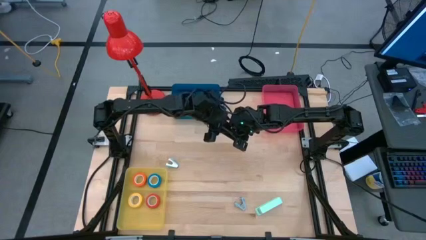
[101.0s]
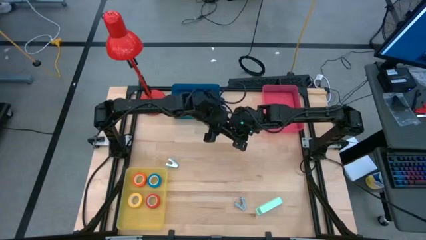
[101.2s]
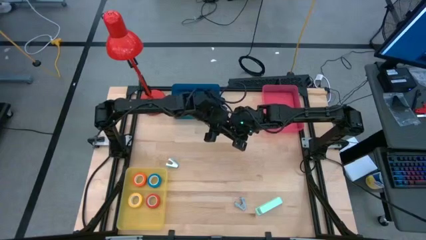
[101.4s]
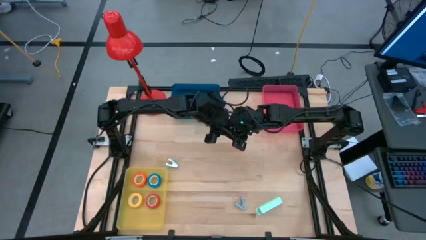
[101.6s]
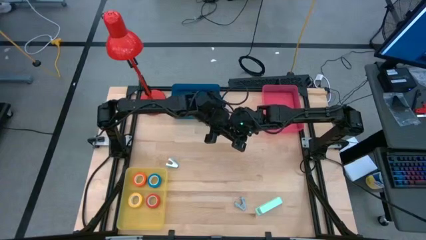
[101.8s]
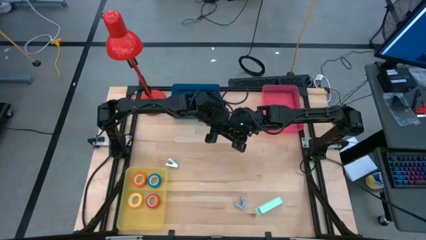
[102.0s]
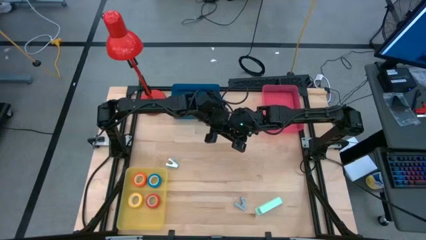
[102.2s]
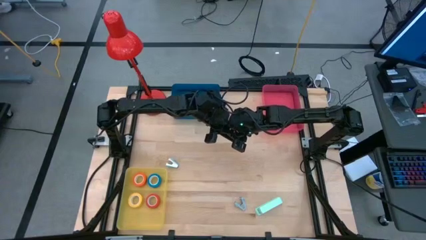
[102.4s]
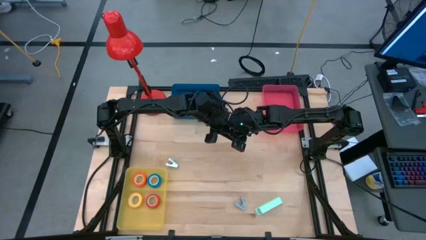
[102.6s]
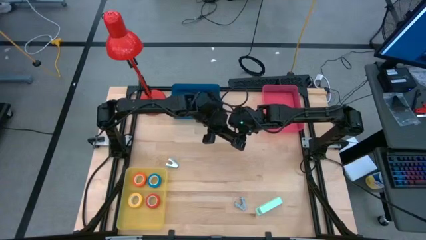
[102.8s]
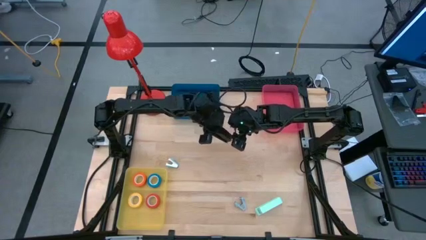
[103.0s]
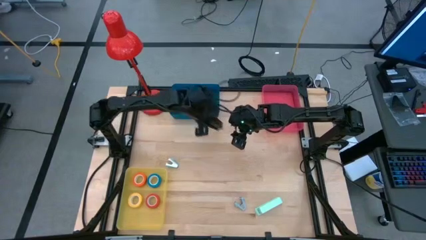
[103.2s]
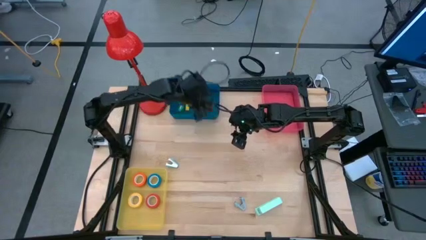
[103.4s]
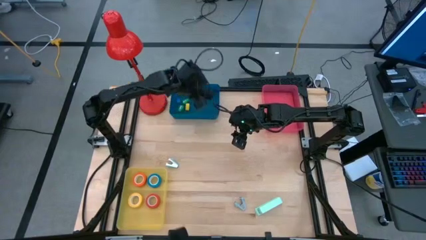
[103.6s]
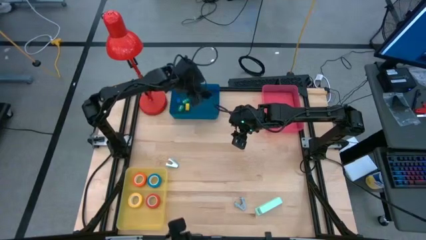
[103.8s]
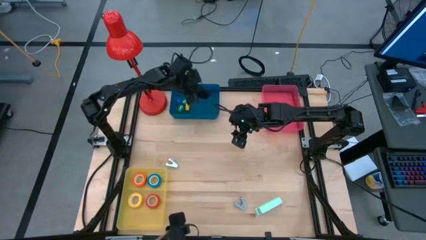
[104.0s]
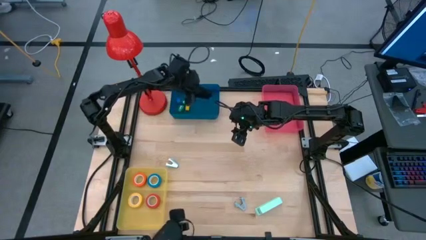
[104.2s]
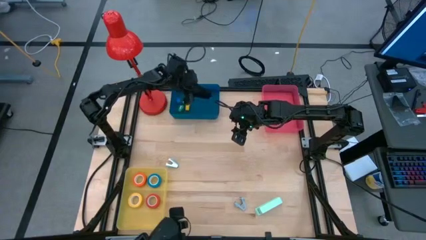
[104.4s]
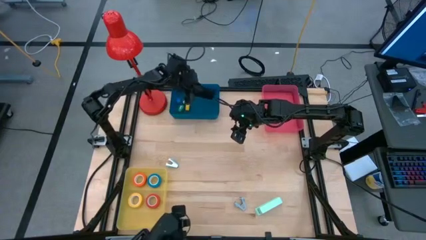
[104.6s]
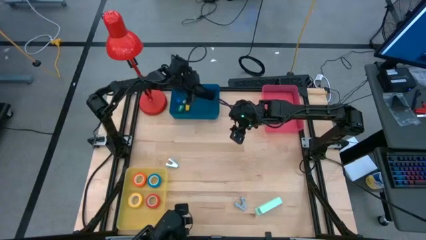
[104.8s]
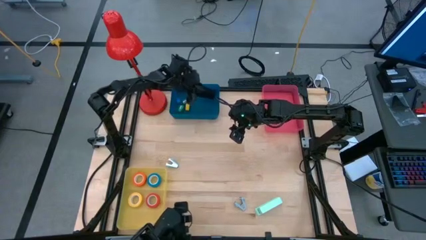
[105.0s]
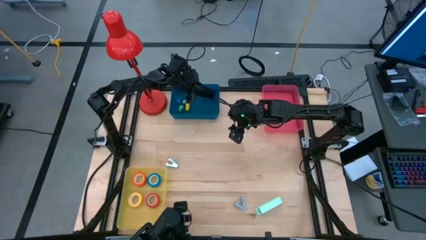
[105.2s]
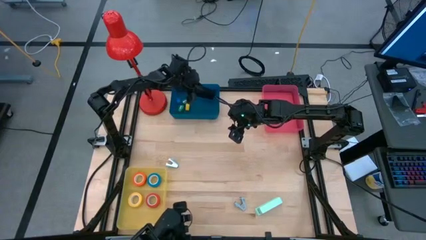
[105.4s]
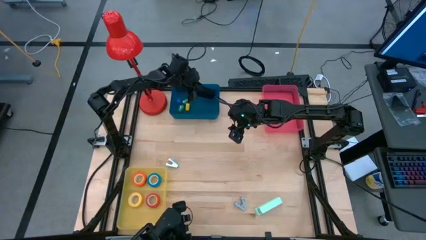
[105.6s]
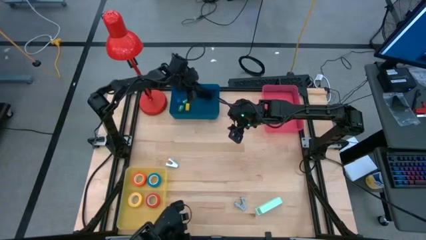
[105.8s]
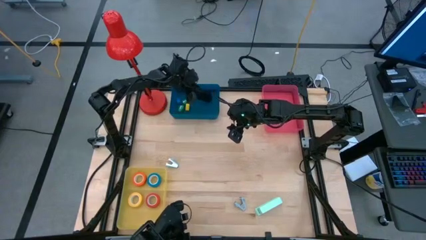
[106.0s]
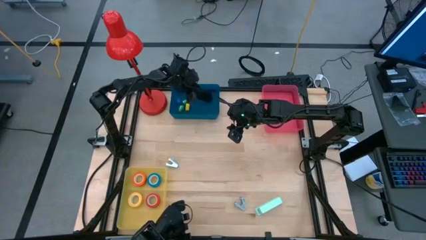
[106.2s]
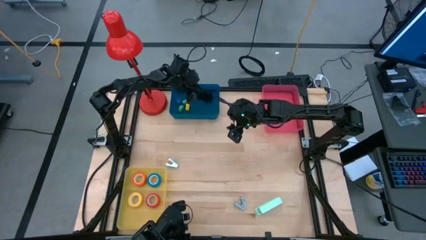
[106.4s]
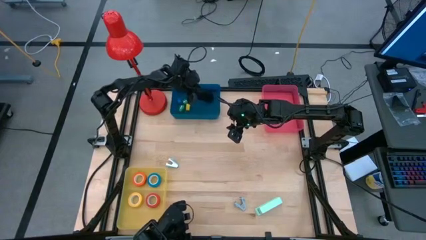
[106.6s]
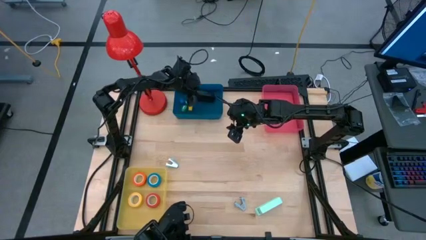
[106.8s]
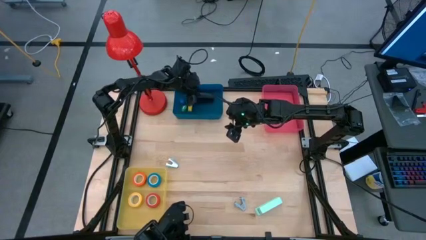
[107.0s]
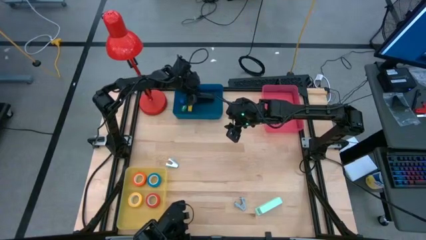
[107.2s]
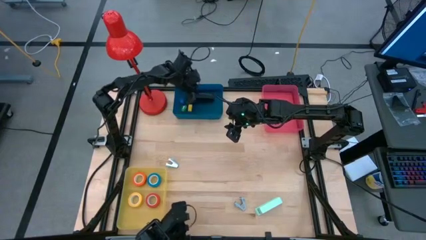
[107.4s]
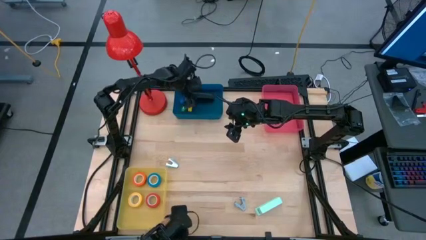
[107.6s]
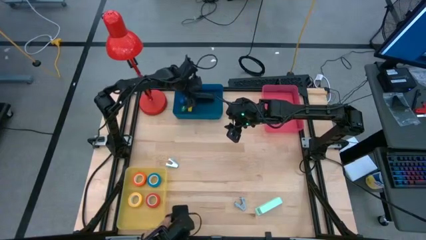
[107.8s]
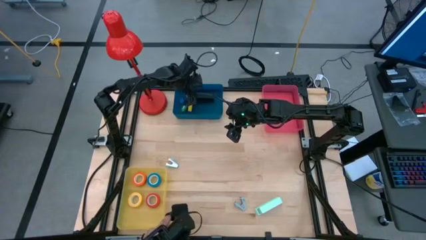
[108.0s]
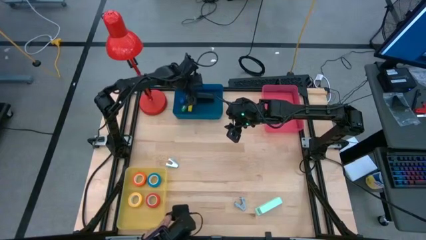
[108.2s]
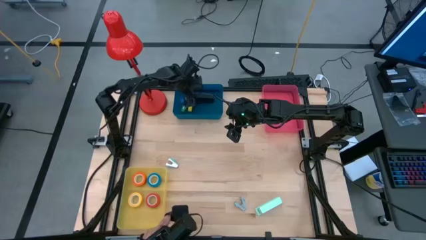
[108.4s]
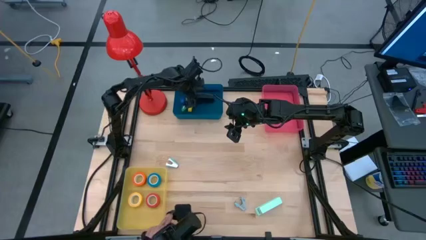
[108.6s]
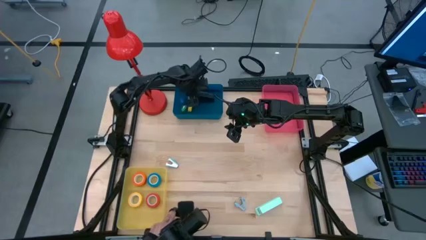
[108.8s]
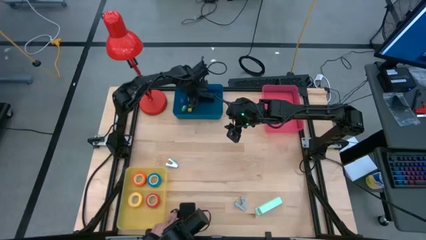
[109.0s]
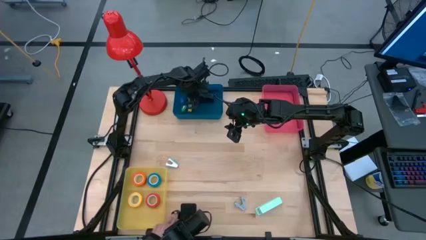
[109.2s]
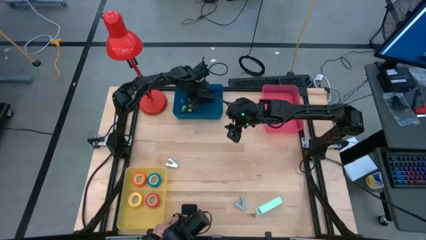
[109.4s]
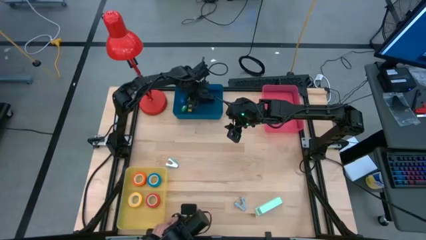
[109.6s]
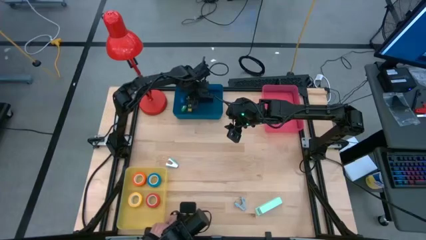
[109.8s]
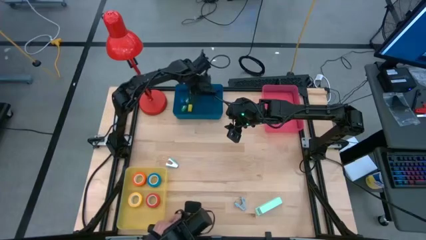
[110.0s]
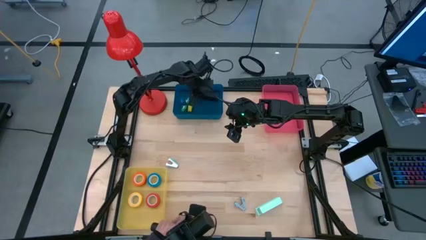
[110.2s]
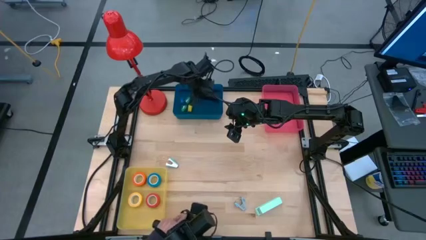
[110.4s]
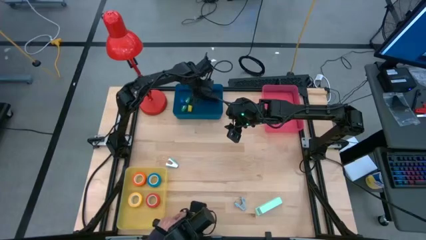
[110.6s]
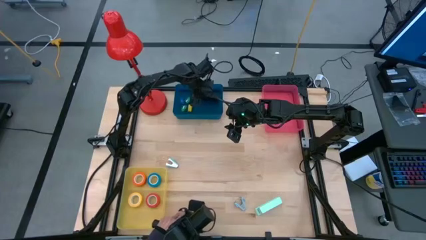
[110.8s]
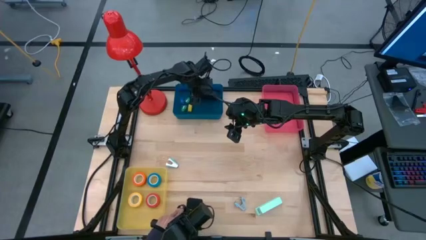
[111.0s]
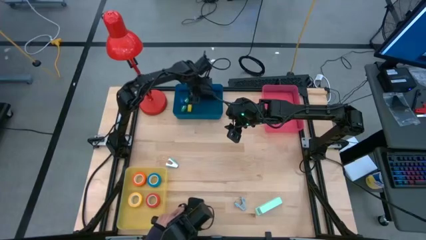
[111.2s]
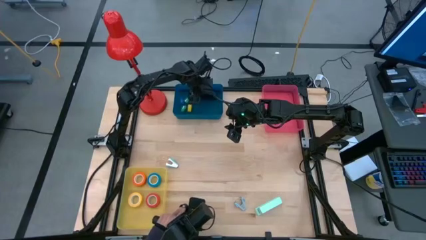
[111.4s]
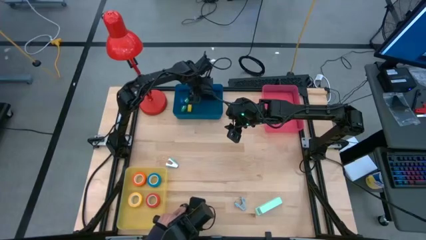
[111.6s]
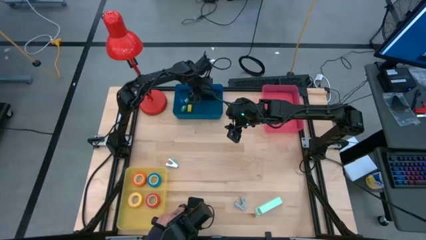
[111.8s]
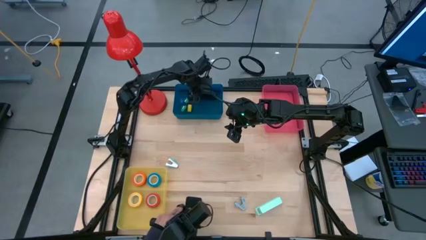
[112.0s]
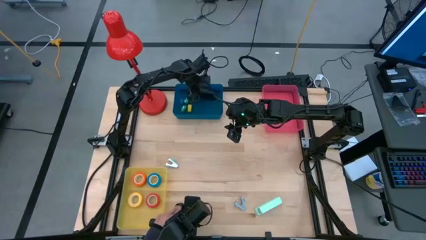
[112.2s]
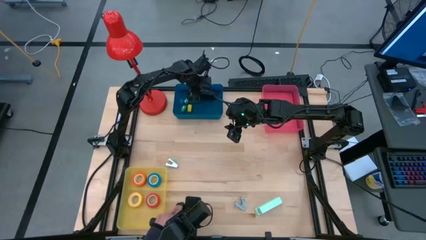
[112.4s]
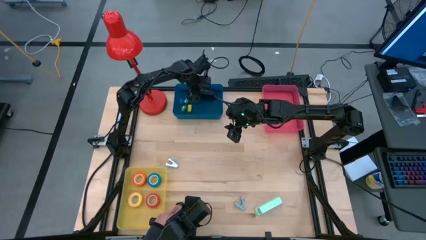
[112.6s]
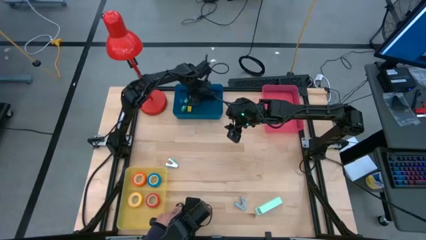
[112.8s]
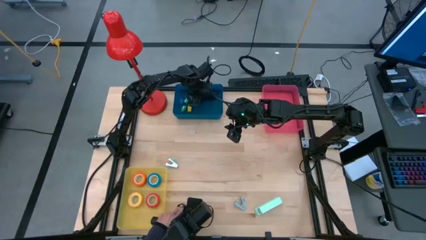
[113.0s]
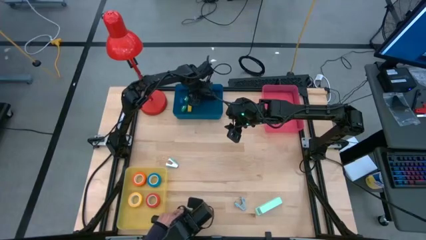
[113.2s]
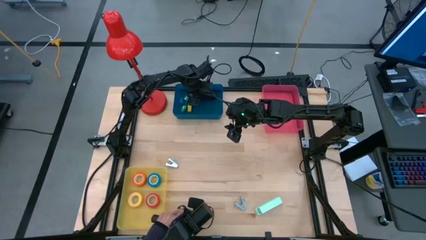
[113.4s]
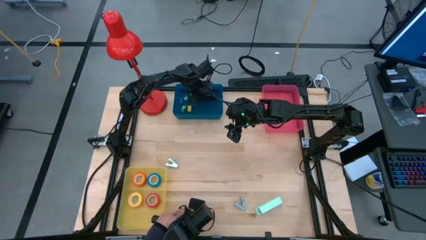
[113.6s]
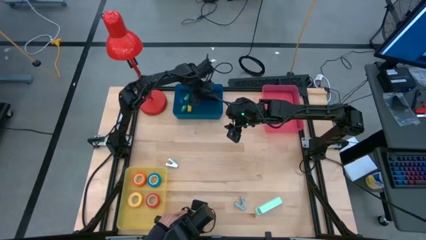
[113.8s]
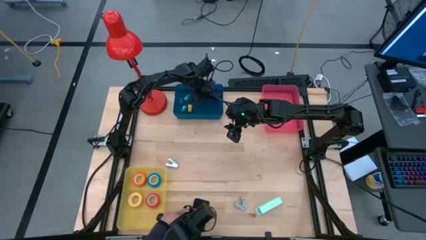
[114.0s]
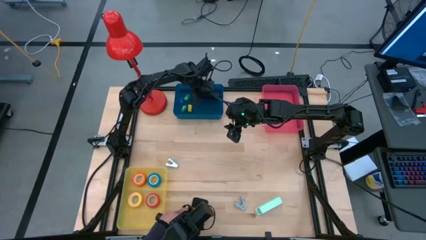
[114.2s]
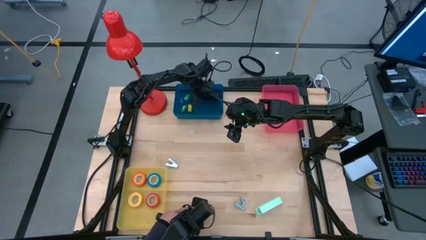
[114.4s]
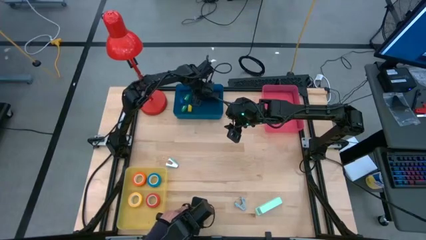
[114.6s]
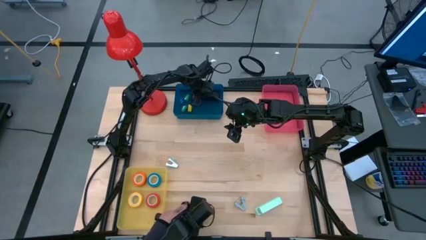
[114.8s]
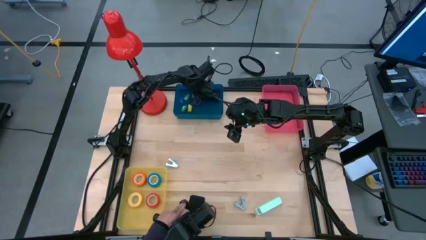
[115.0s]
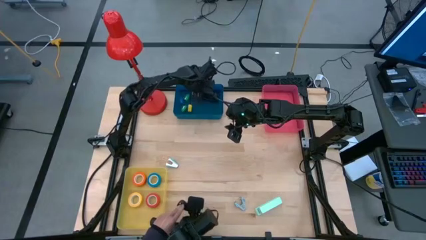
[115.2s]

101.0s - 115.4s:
Task: Pick and place Stapler, Stapler remover, tape
Put the black stapler into the blue bin

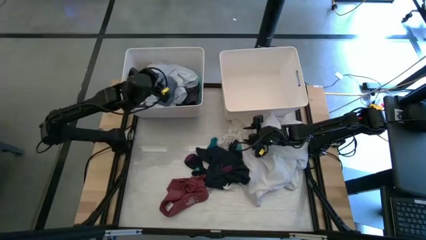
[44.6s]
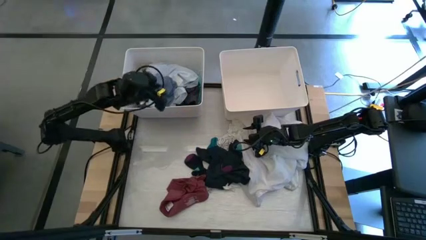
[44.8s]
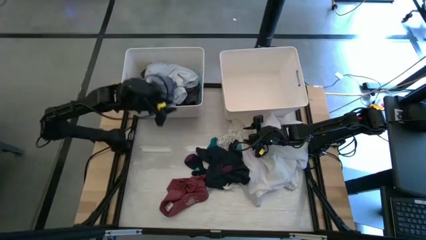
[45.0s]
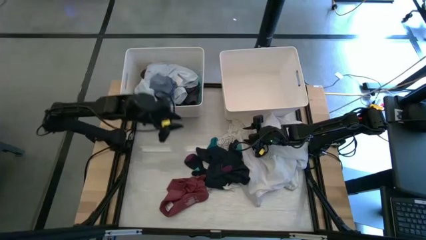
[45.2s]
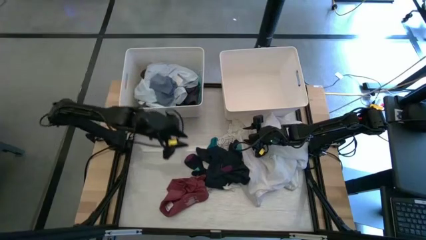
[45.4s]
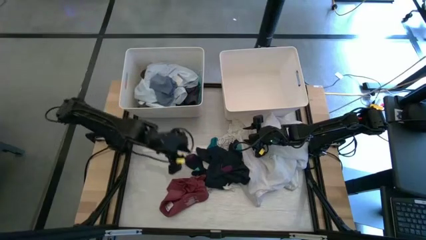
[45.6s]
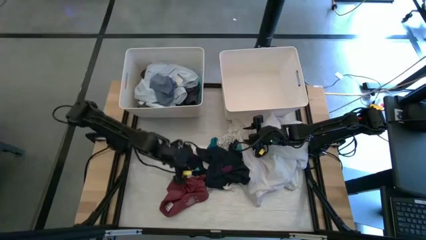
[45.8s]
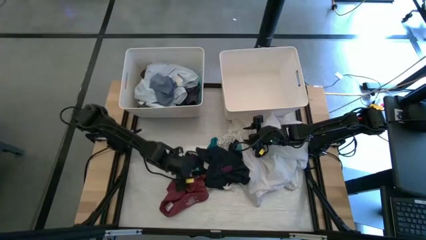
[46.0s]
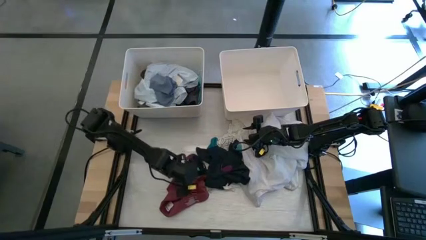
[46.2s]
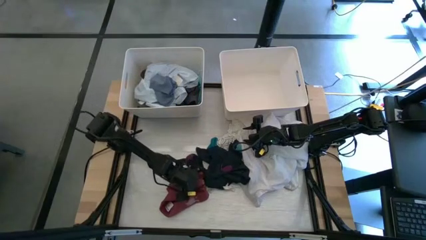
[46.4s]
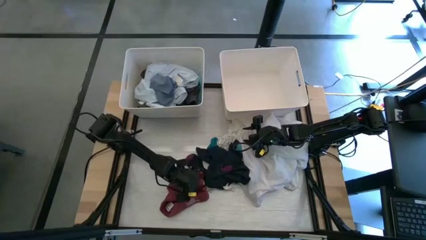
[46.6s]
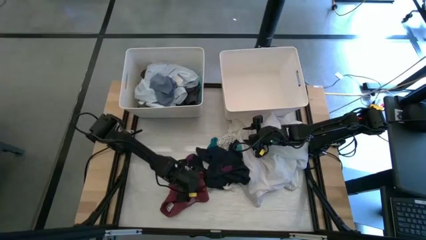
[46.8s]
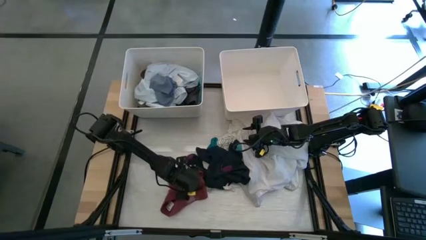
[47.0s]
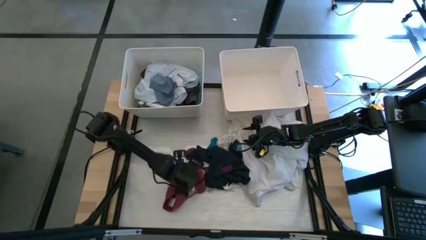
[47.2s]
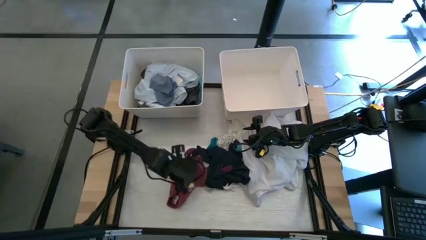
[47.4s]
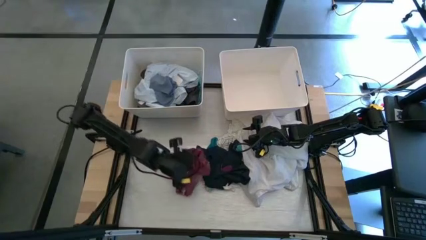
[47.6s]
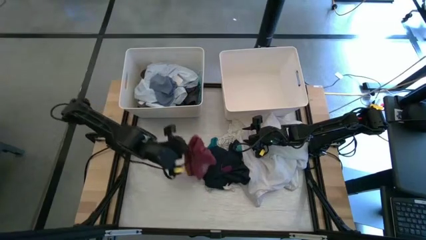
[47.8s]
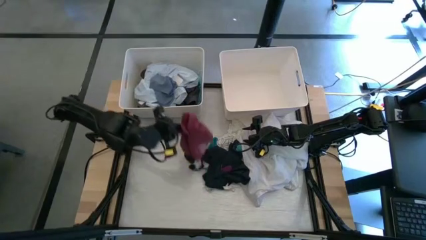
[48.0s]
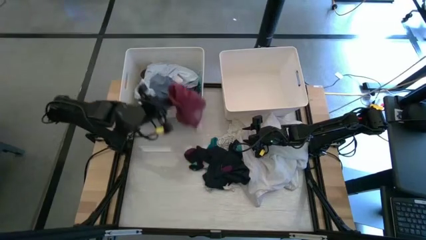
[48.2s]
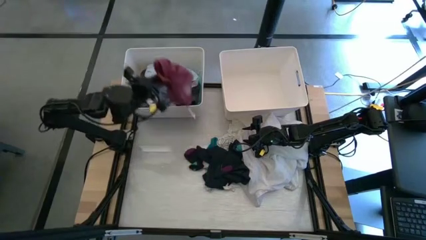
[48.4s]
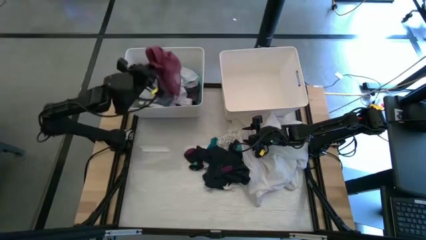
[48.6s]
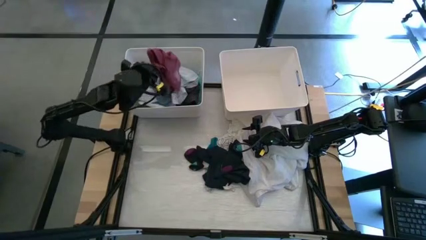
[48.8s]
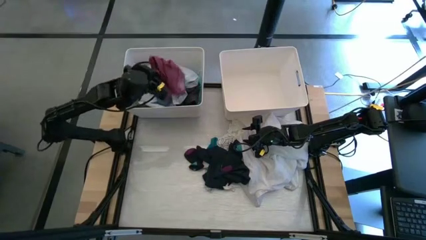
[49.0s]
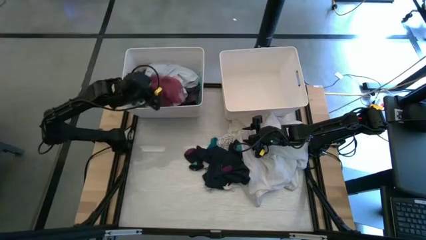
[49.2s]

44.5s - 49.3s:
Task: Sort clothes
Put the dark red shirt into the left white laundry bin
